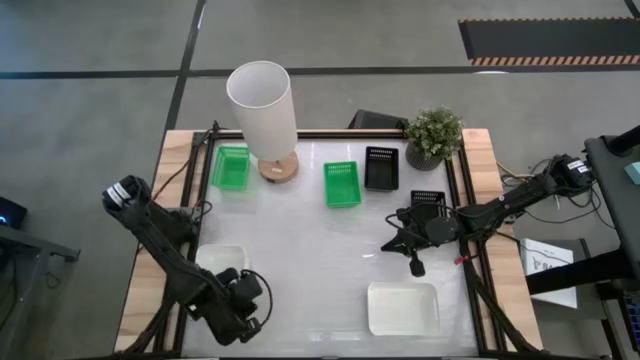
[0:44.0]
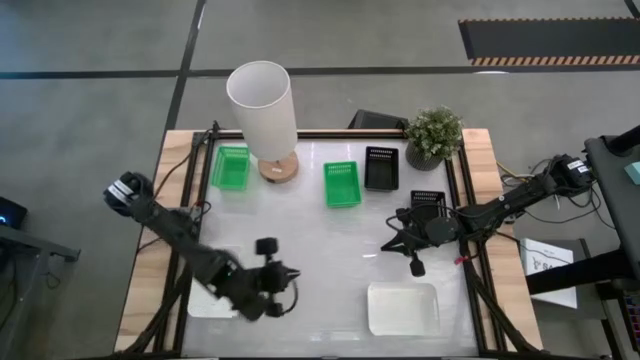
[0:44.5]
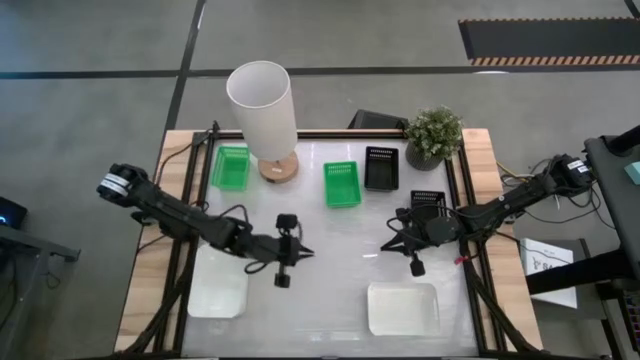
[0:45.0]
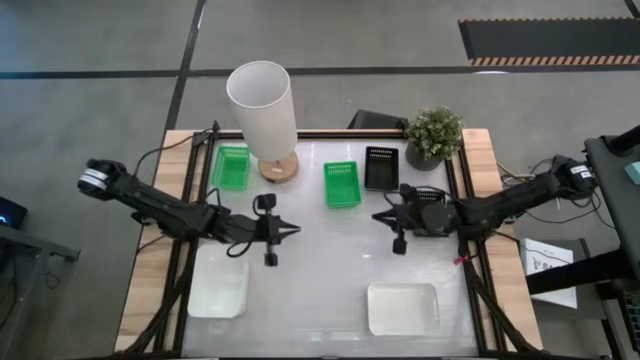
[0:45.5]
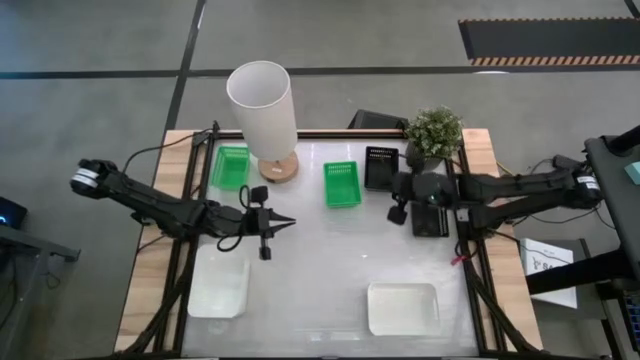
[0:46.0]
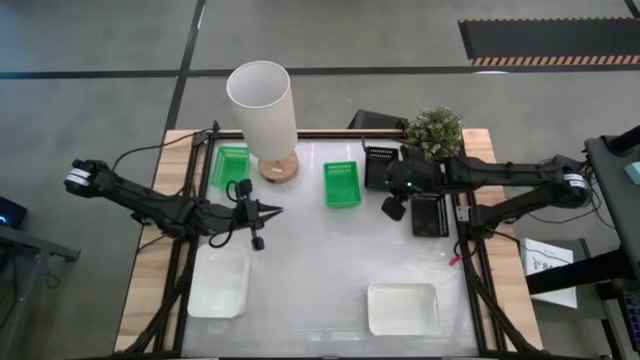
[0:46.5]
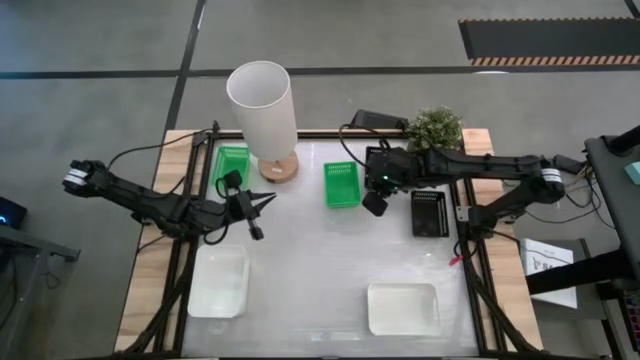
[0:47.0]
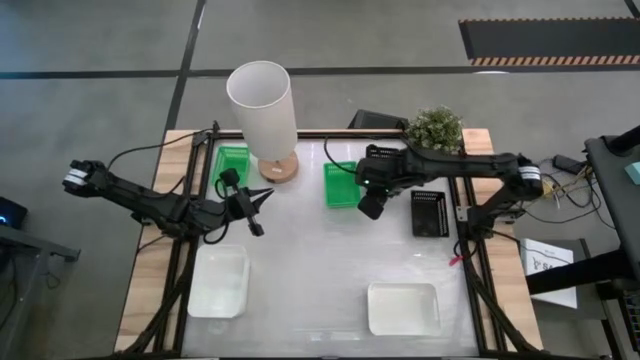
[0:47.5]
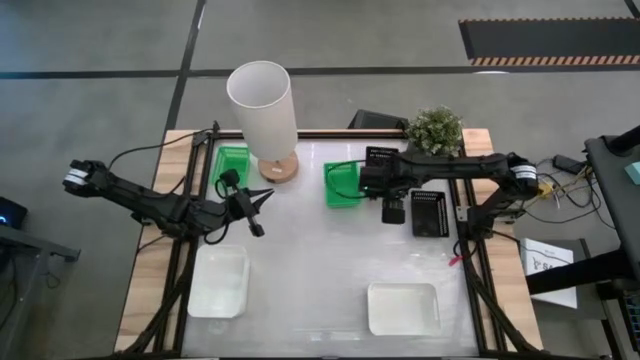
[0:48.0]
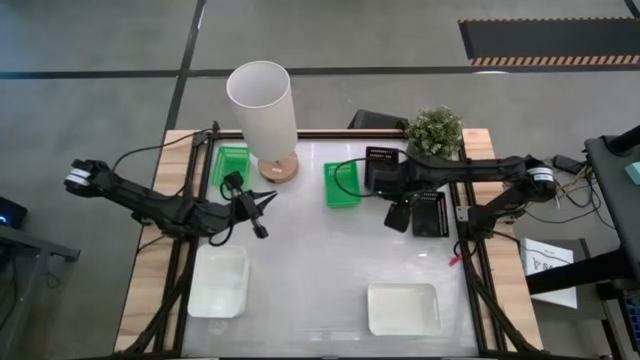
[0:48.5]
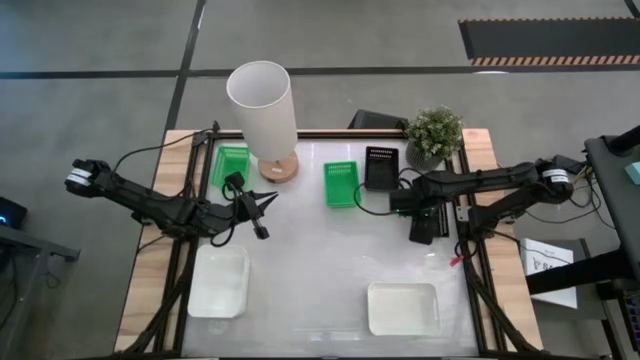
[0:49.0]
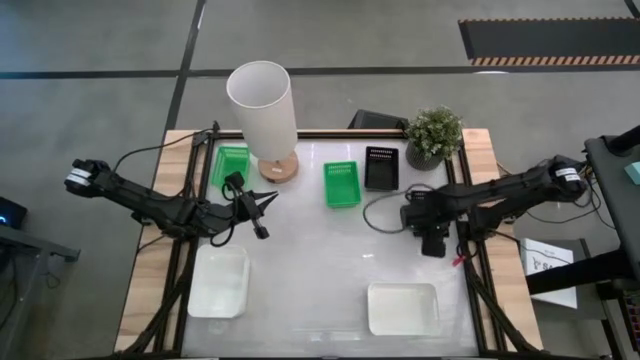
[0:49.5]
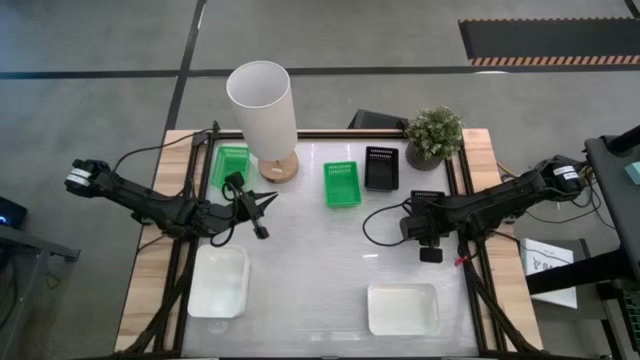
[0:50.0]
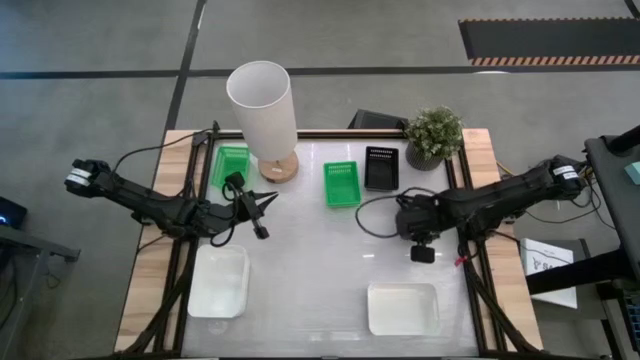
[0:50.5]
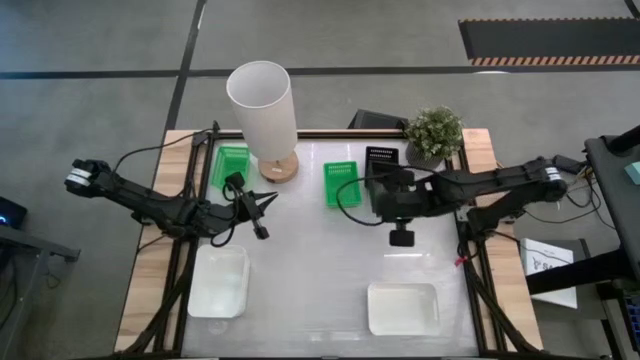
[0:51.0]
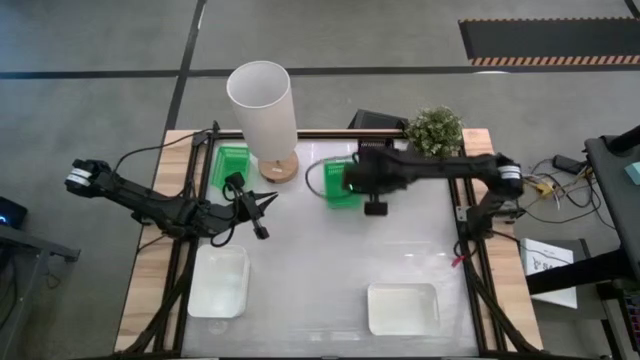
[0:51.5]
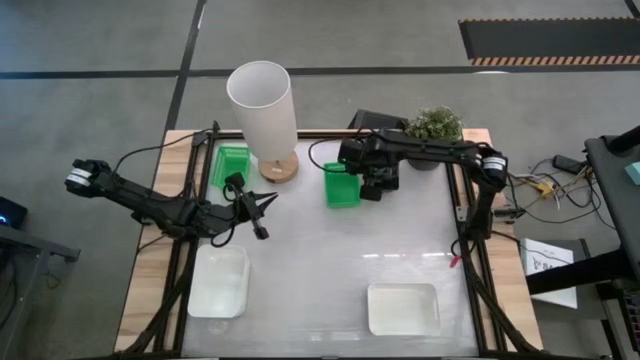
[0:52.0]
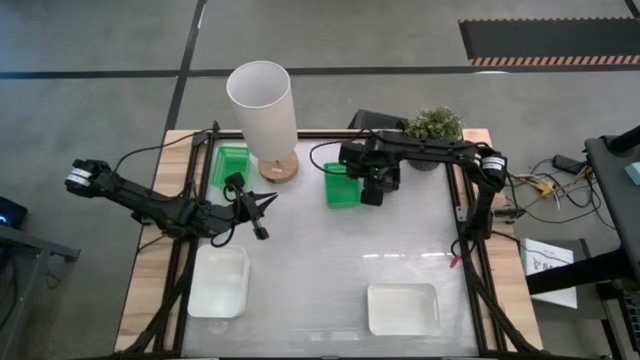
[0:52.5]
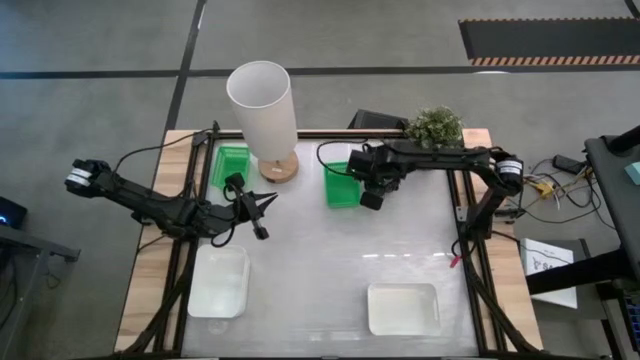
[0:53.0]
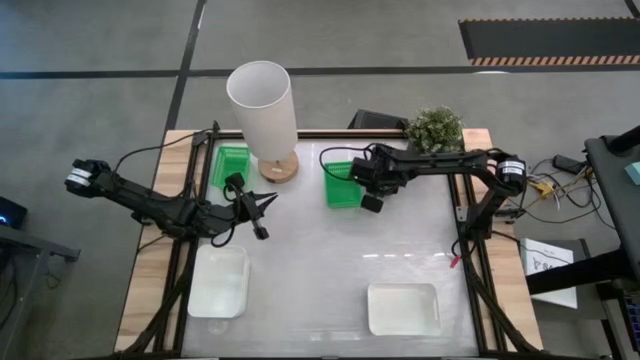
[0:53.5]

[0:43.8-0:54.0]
Stack the black bin on top of the other black bin

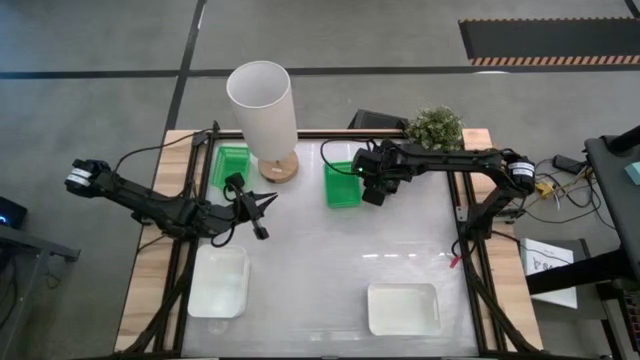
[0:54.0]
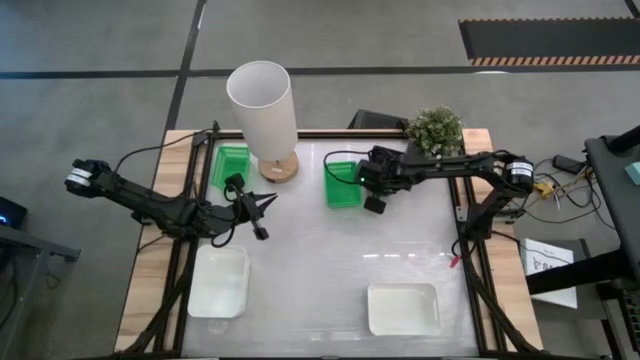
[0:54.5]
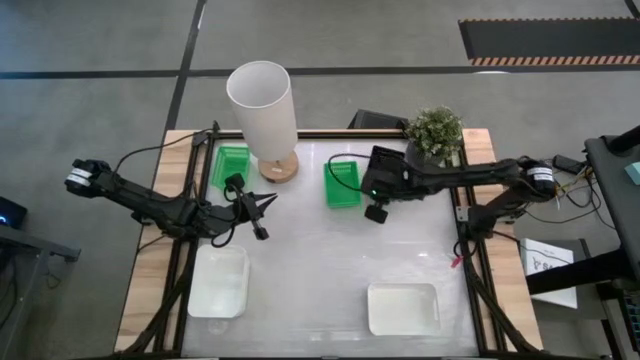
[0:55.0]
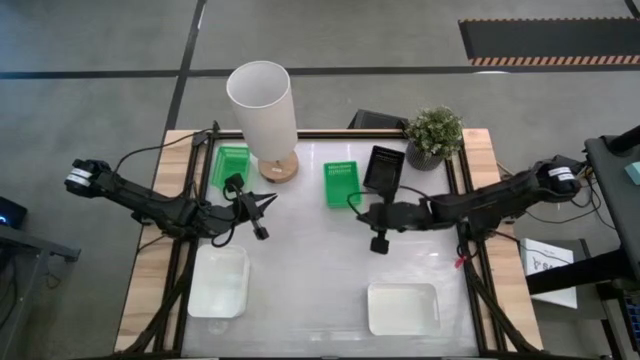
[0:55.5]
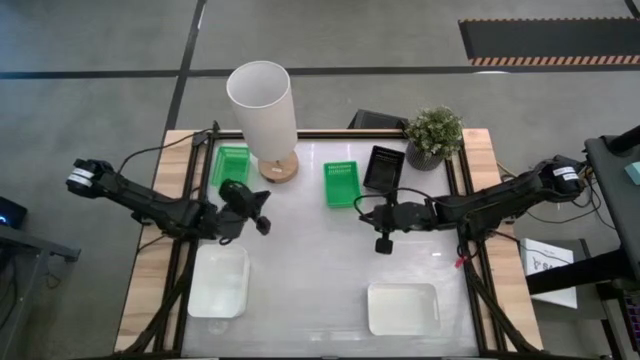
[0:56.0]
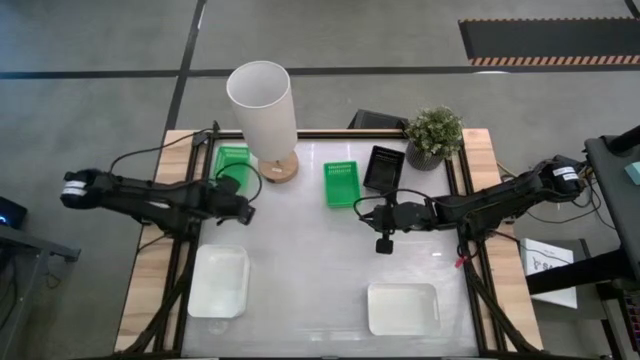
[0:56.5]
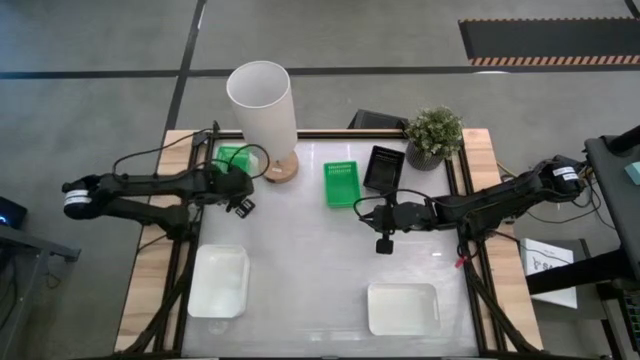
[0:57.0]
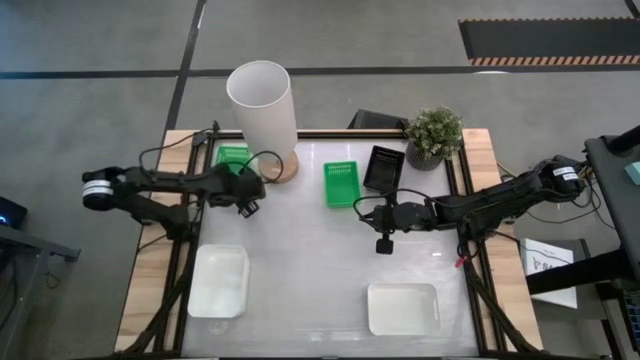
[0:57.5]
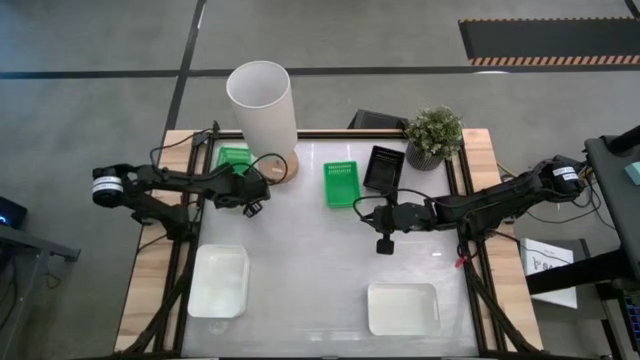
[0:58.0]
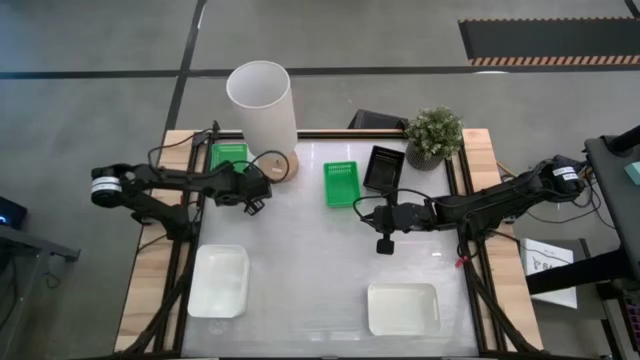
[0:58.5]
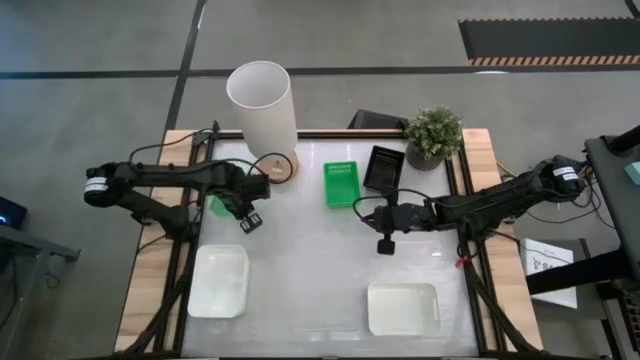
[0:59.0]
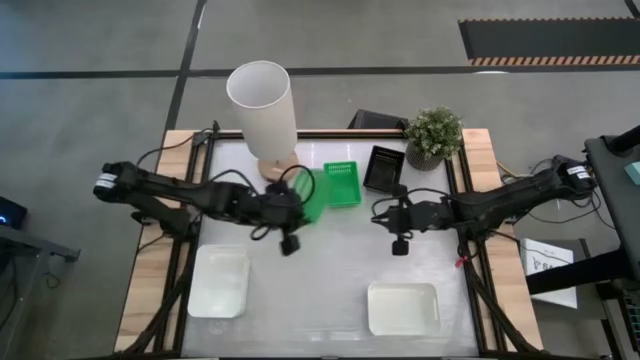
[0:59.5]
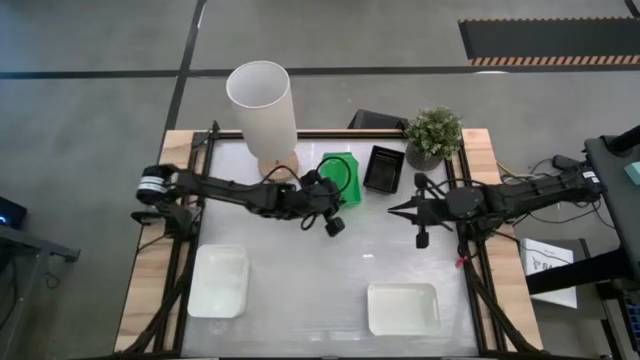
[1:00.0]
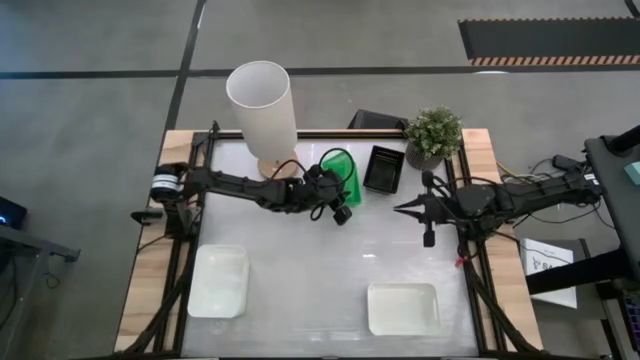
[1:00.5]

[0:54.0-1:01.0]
Stack the green bin on top of the other green bin
